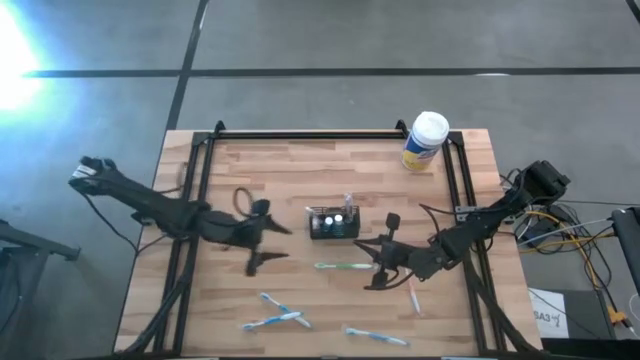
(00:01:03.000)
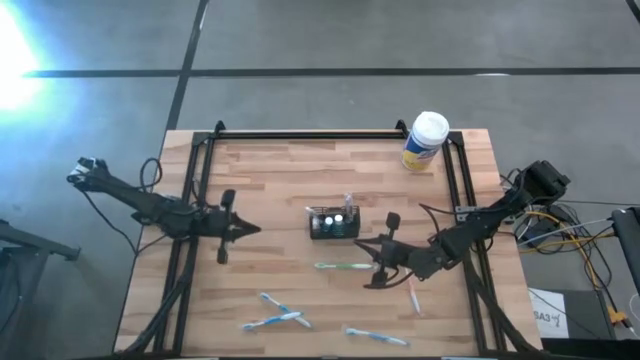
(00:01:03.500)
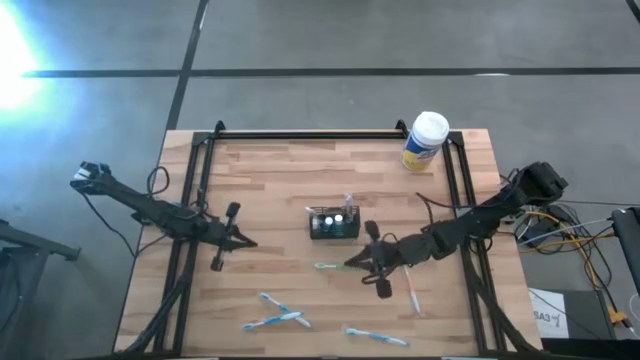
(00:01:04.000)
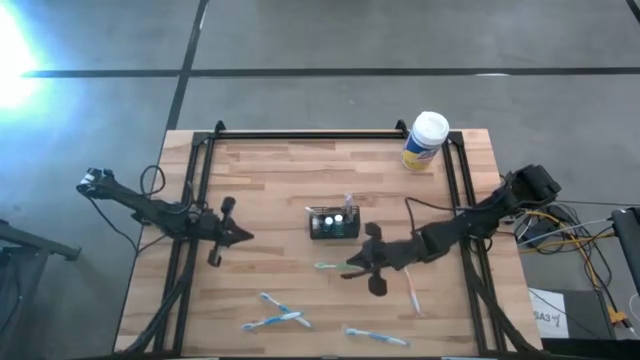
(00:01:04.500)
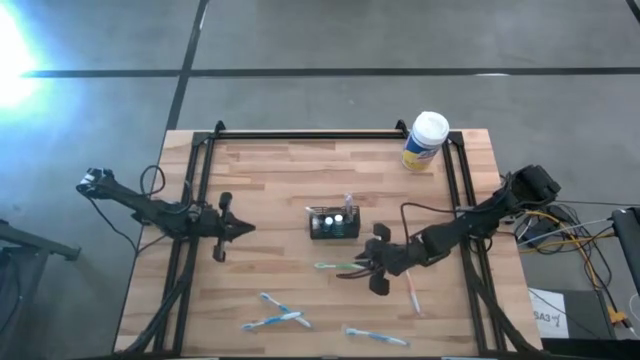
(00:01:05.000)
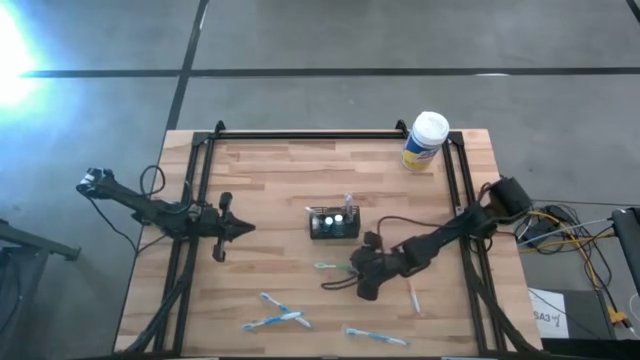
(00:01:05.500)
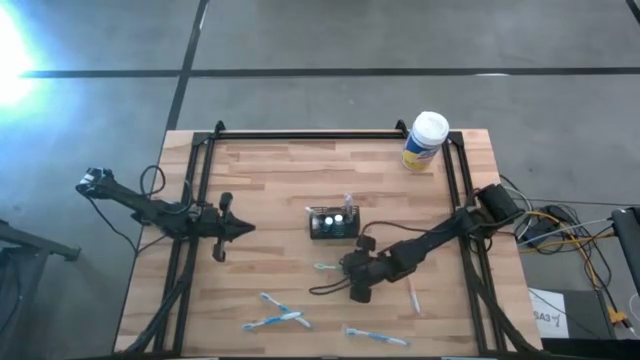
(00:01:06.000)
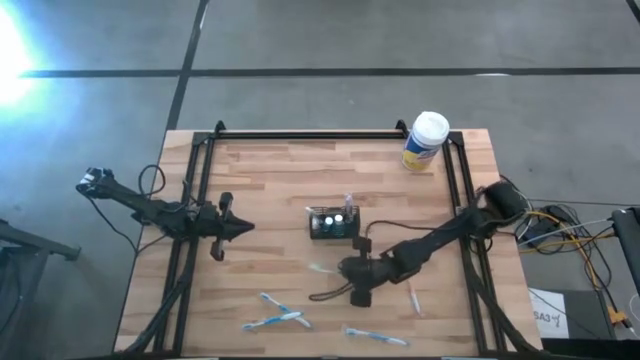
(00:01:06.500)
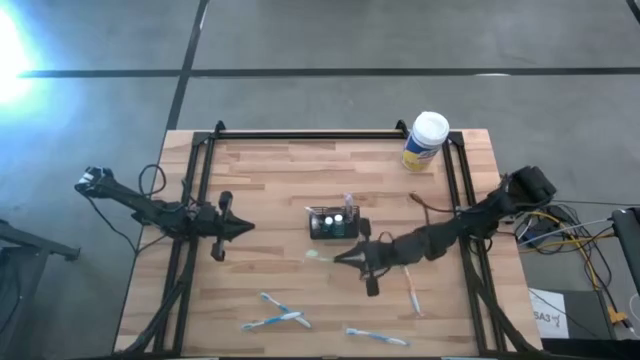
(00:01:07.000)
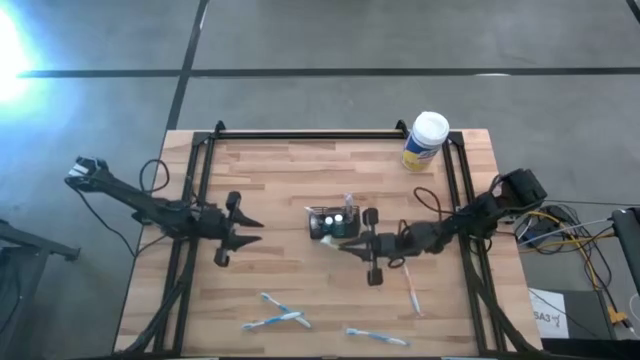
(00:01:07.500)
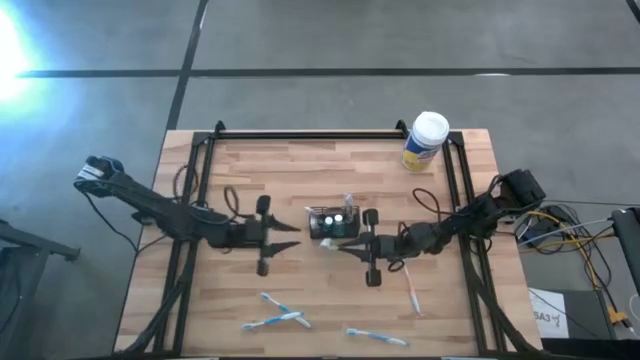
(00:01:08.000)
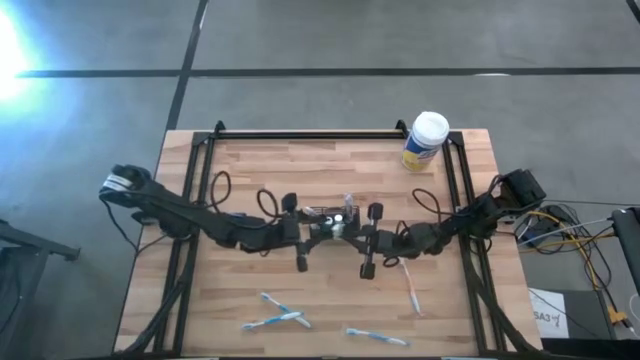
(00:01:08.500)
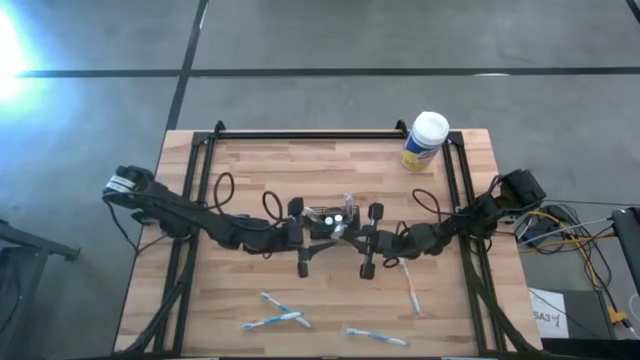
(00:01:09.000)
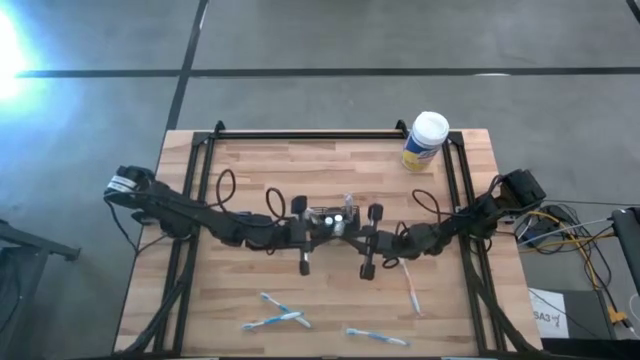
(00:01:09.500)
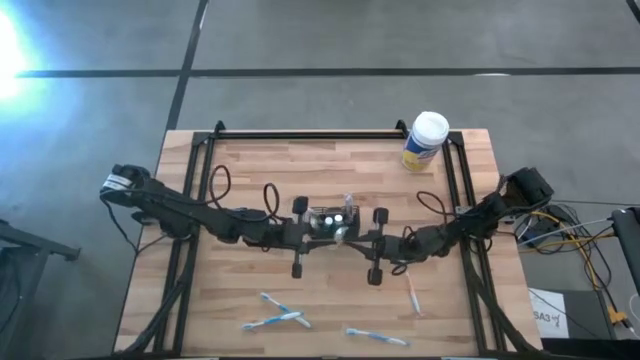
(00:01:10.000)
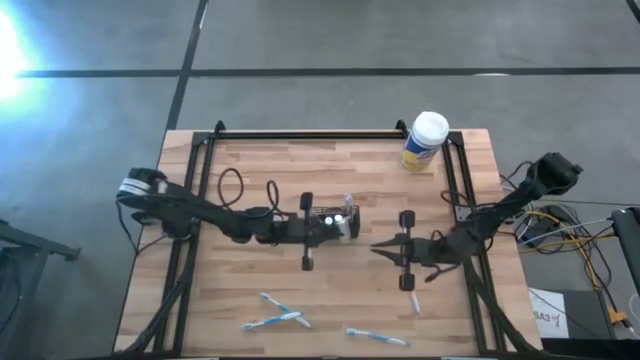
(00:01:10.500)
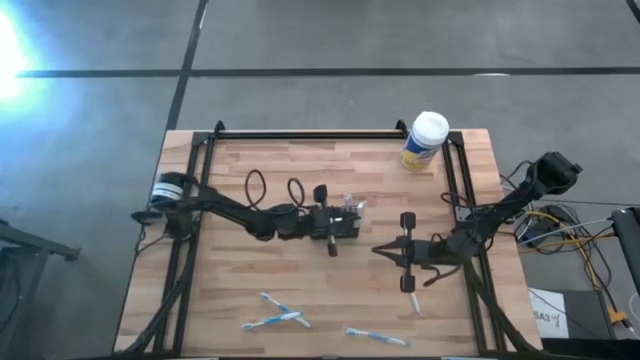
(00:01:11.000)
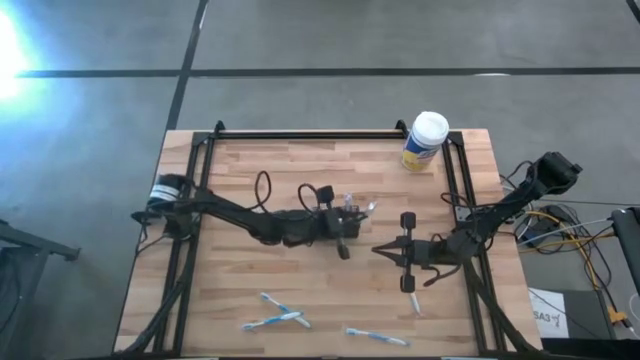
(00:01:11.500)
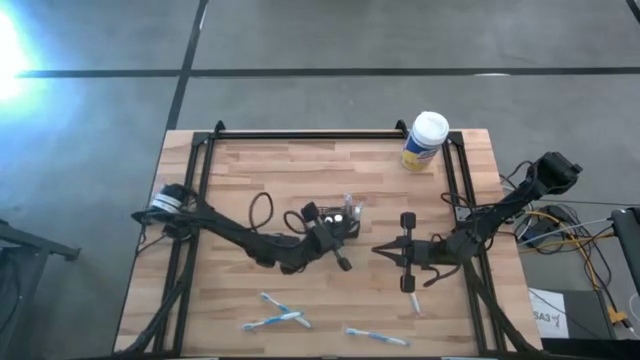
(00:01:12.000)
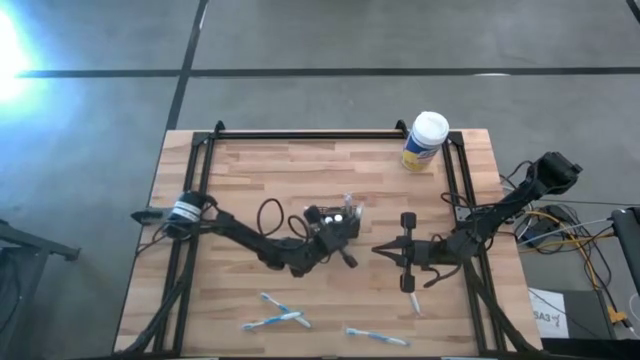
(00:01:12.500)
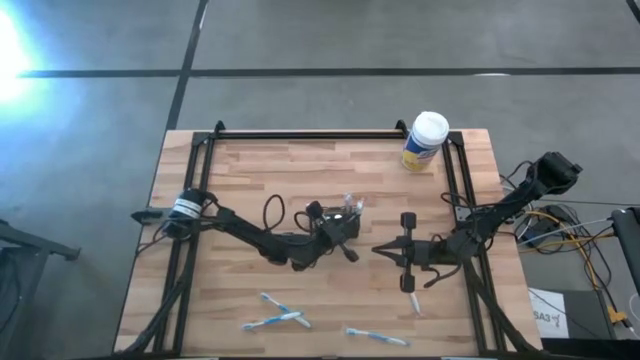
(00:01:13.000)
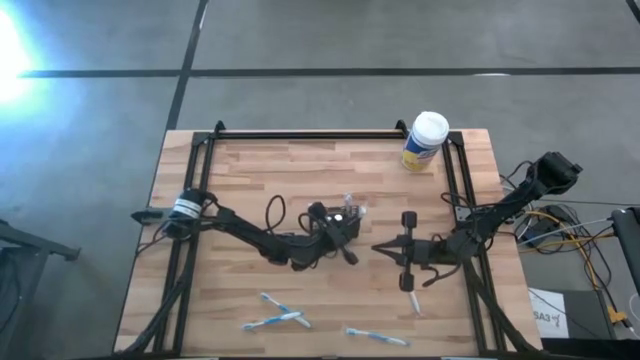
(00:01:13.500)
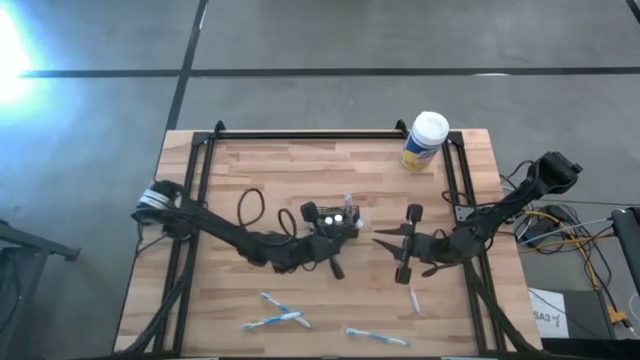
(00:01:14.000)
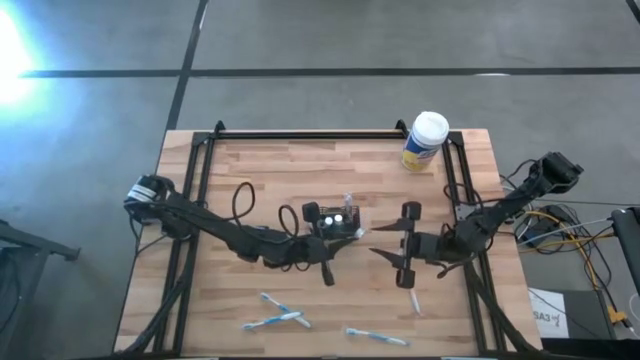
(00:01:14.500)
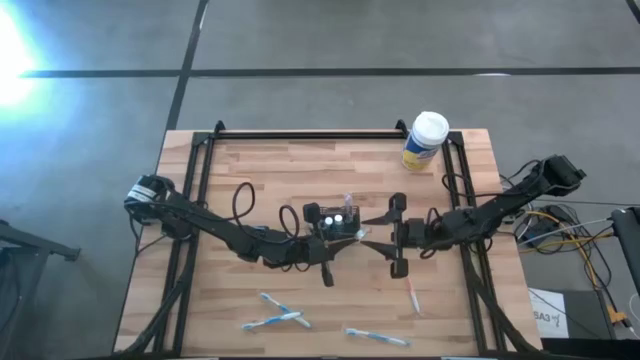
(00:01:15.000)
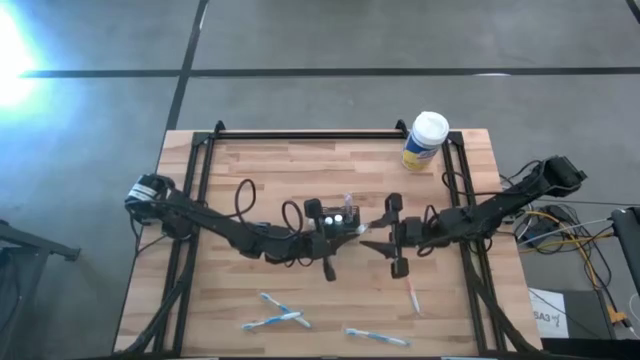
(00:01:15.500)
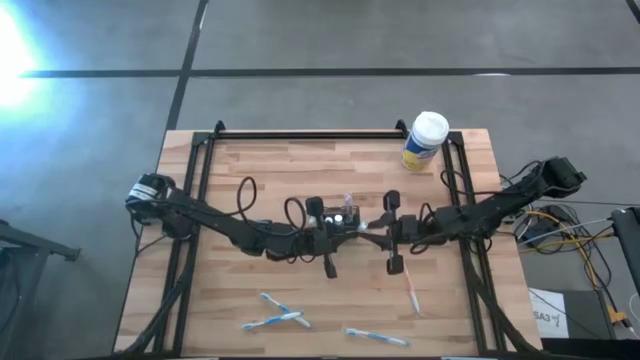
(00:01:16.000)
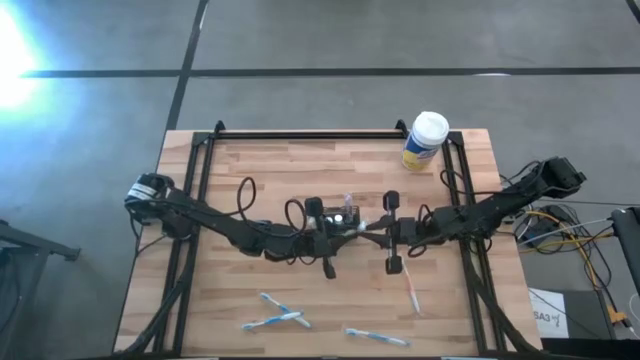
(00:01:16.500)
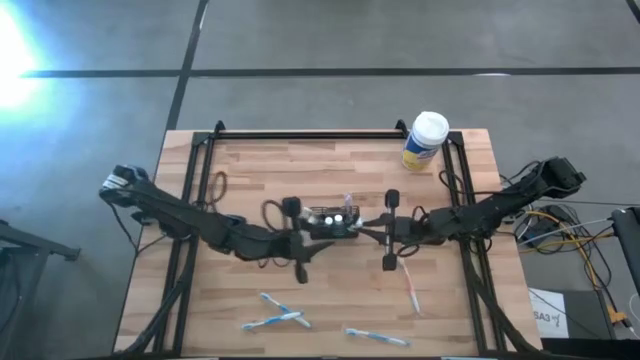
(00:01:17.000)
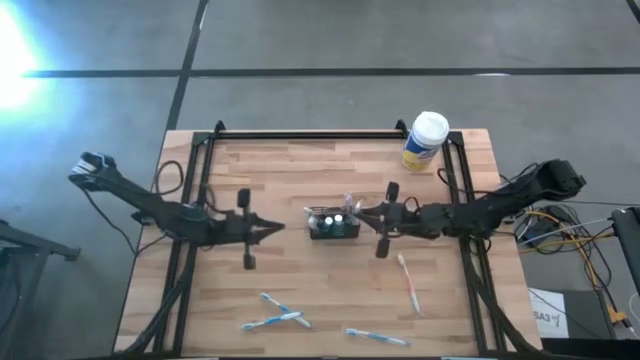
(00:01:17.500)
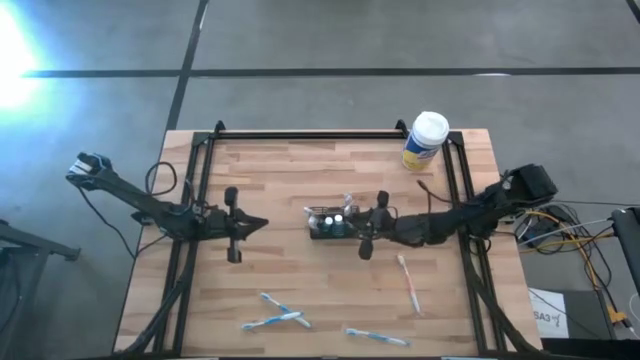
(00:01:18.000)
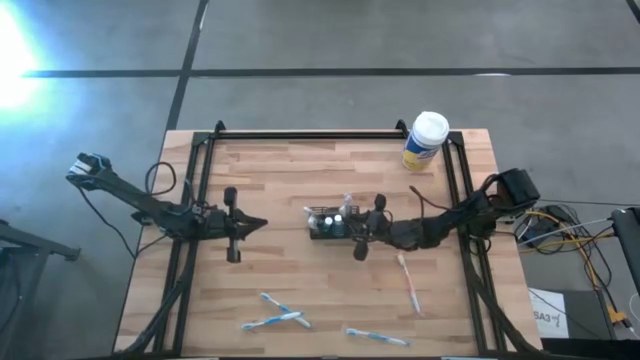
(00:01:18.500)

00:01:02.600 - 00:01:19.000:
Task: Pick & Place toothbrushing station
Put the green toothbrush into the black organizer

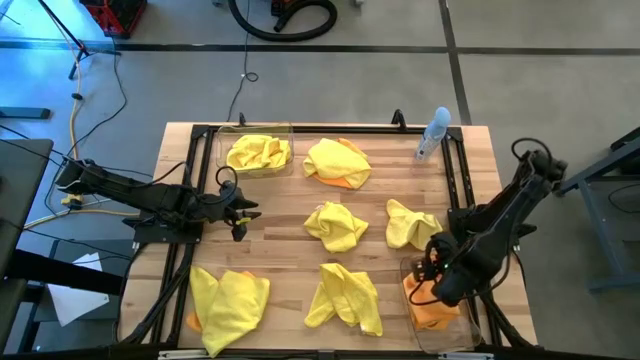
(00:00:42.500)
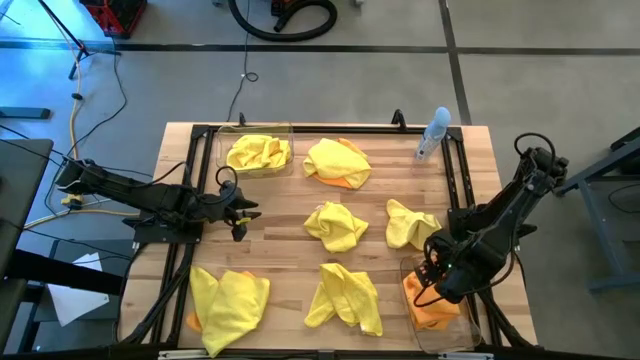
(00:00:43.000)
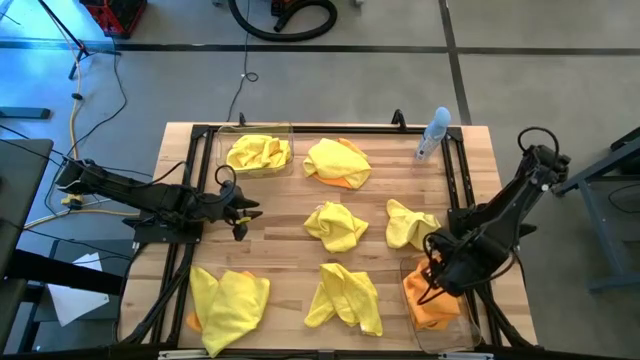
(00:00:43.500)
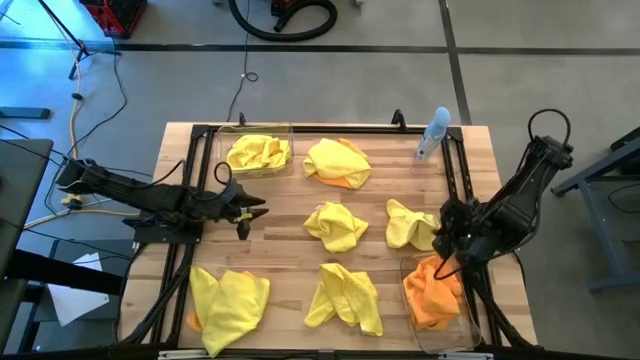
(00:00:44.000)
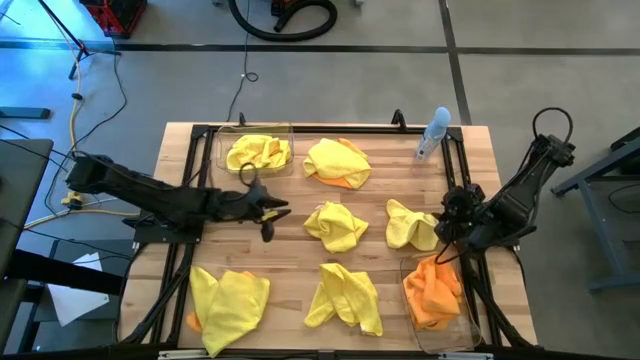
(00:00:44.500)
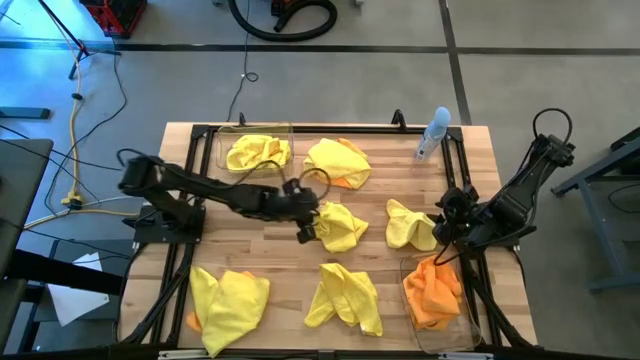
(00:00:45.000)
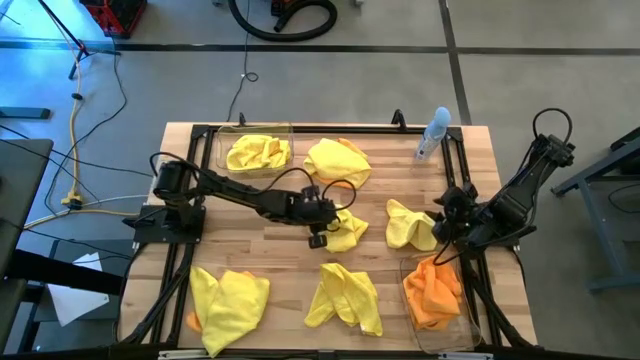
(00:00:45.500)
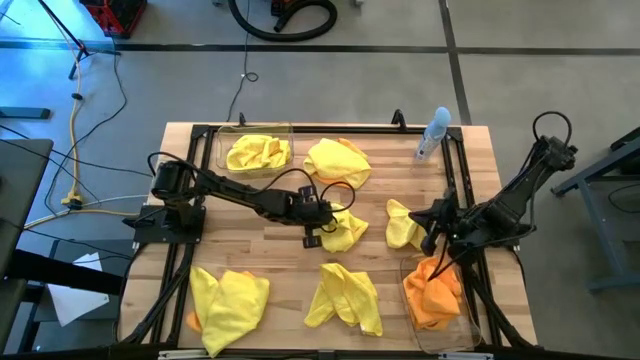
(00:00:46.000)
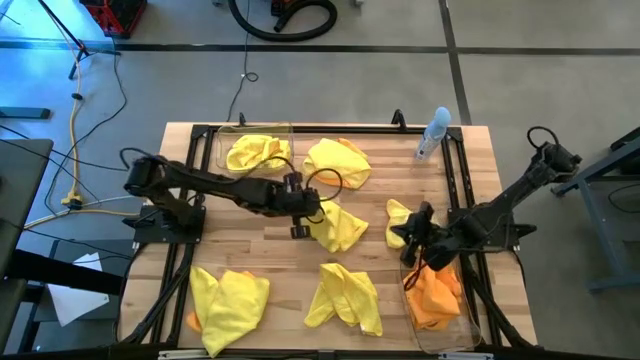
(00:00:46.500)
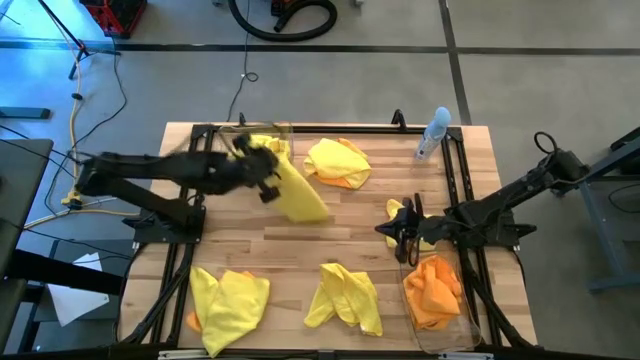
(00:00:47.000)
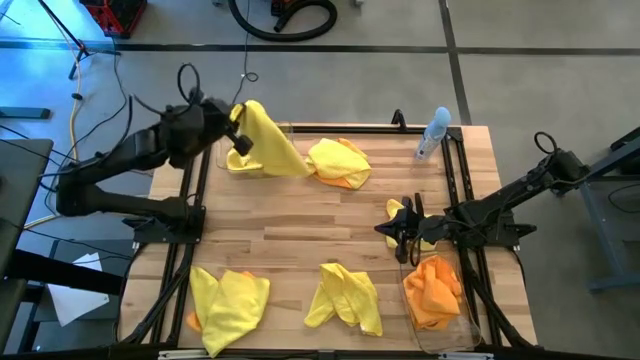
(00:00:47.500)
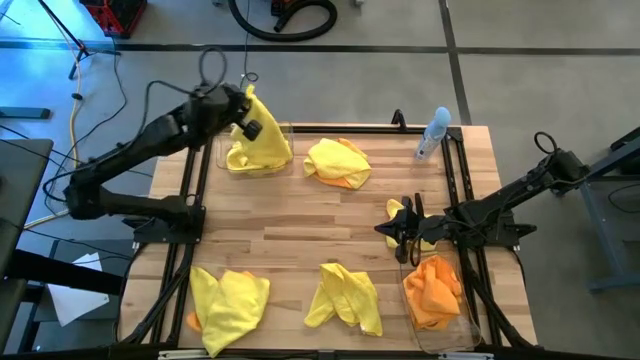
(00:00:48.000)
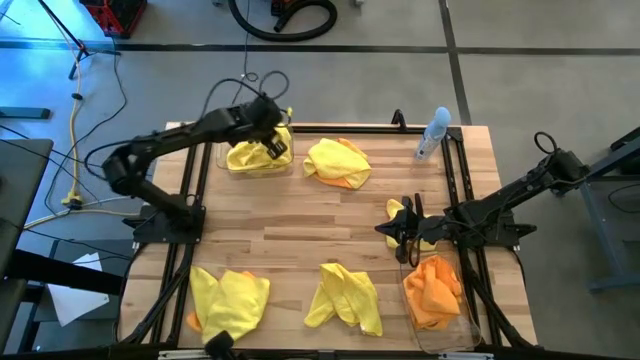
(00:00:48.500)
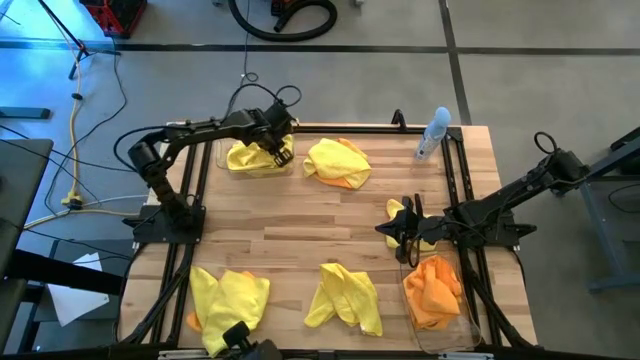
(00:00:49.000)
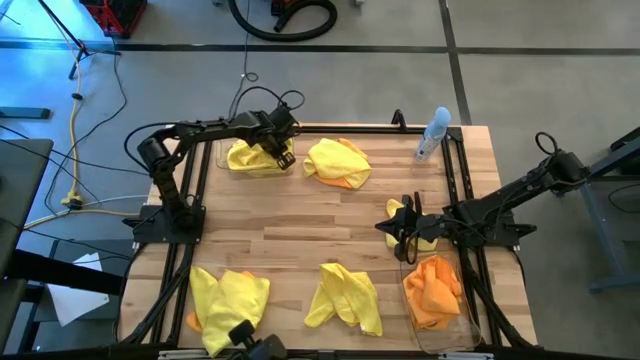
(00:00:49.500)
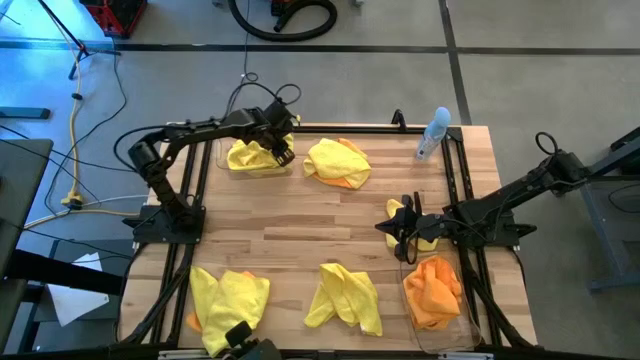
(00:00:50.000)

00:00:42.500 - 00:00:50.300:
Task: Sort microfiber towel by color & place in baskets
Put the yellow towel into the top transparent bin
